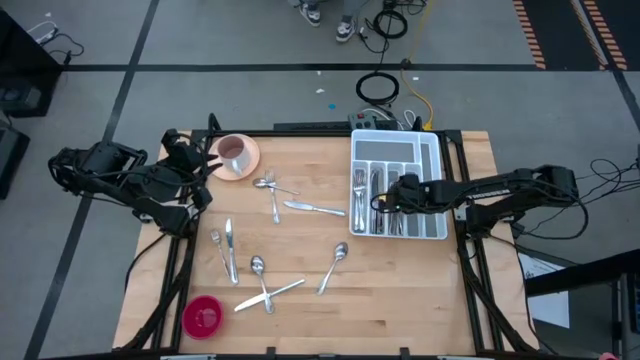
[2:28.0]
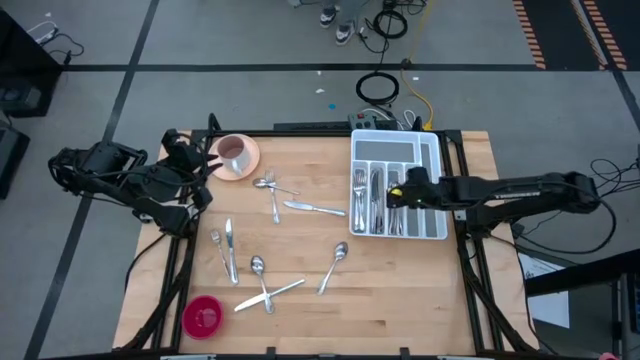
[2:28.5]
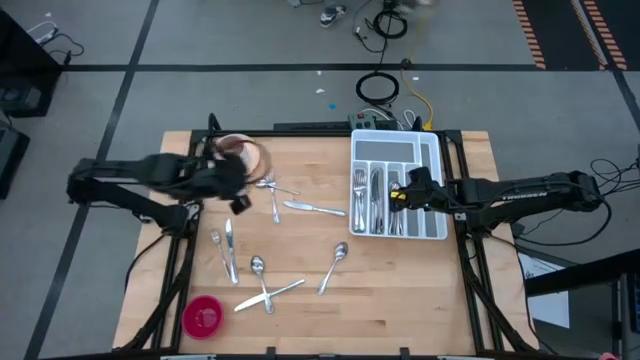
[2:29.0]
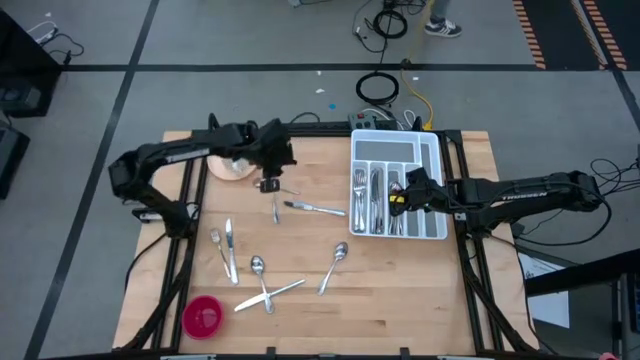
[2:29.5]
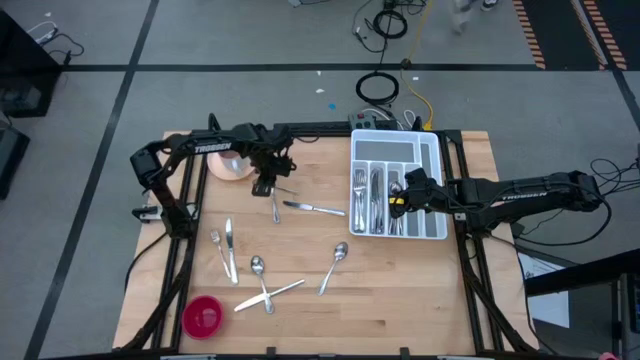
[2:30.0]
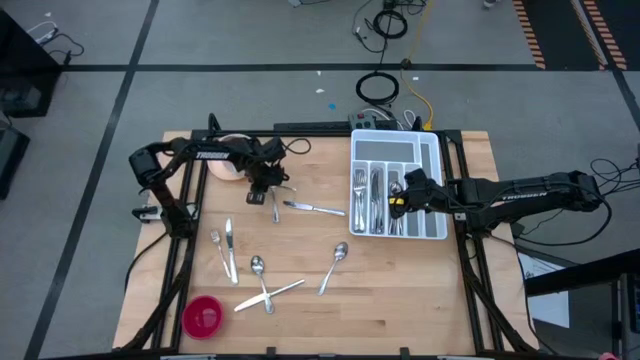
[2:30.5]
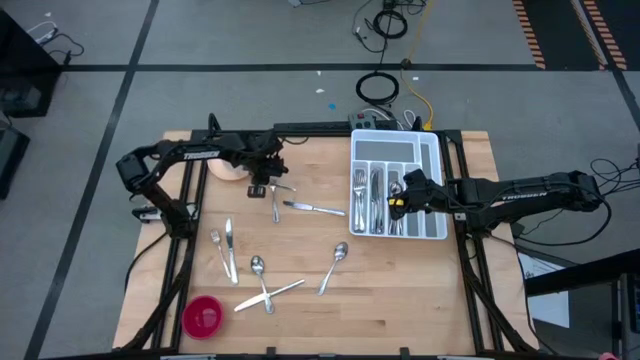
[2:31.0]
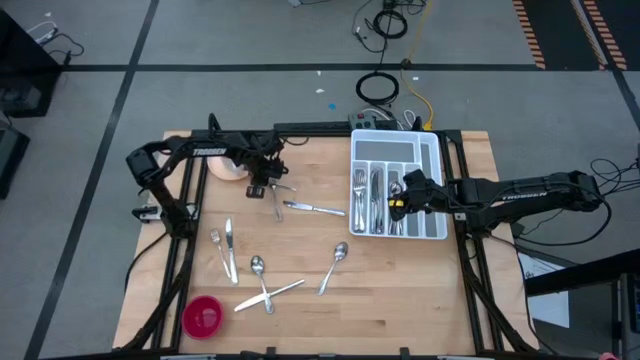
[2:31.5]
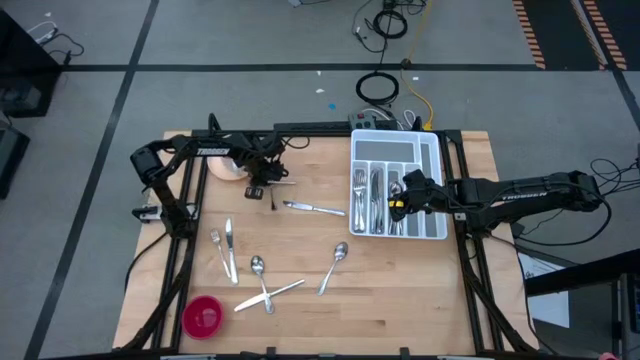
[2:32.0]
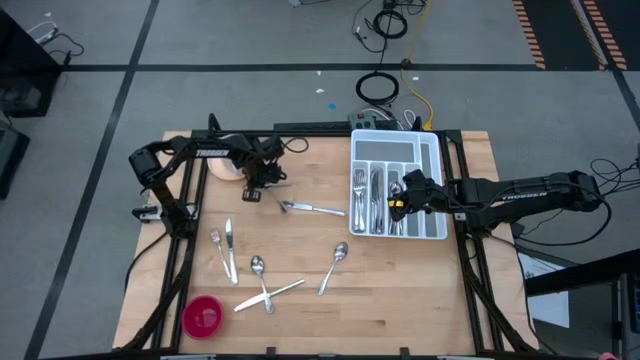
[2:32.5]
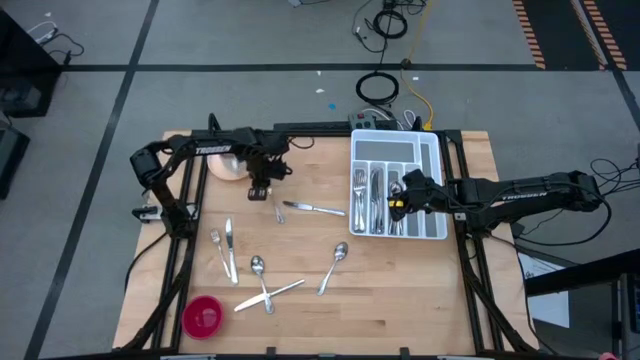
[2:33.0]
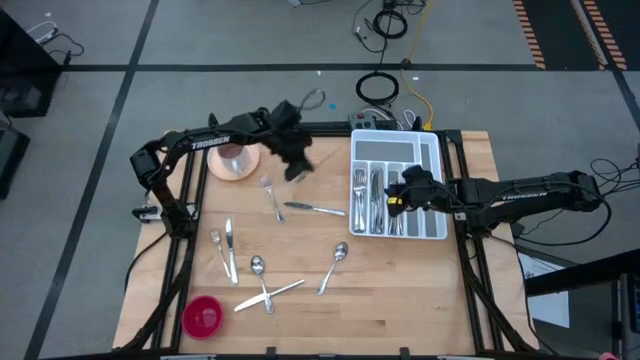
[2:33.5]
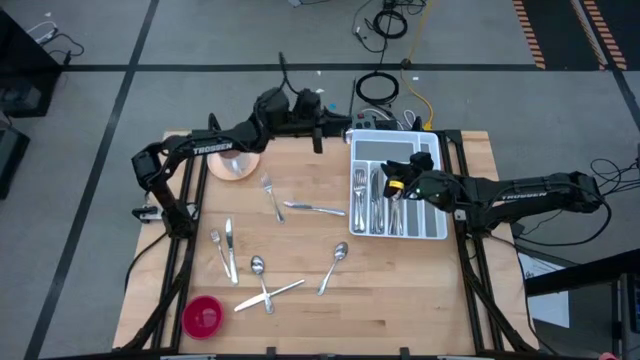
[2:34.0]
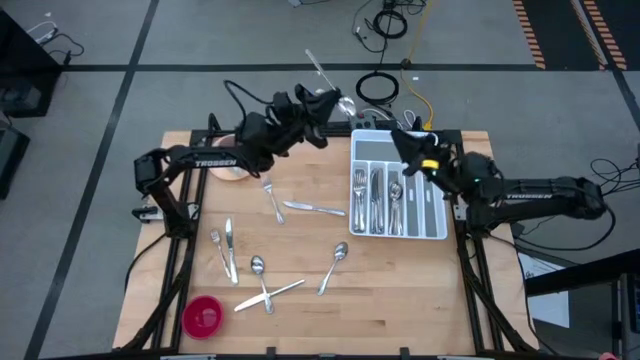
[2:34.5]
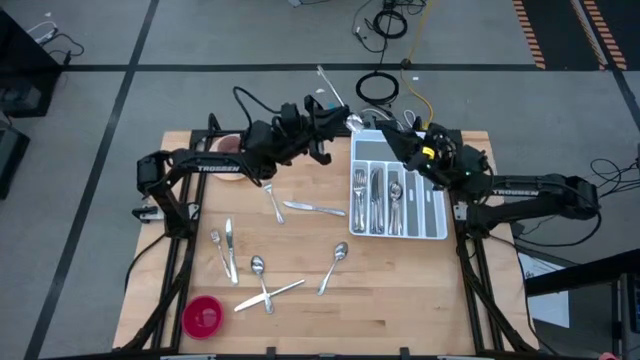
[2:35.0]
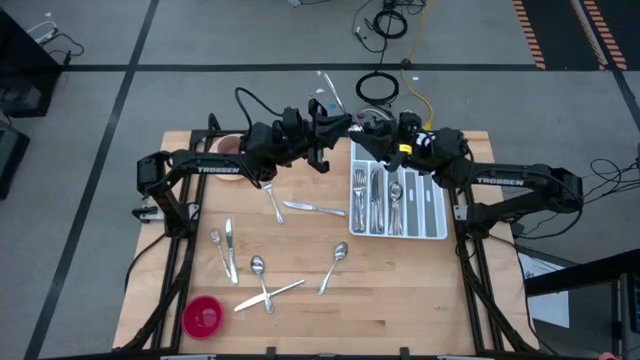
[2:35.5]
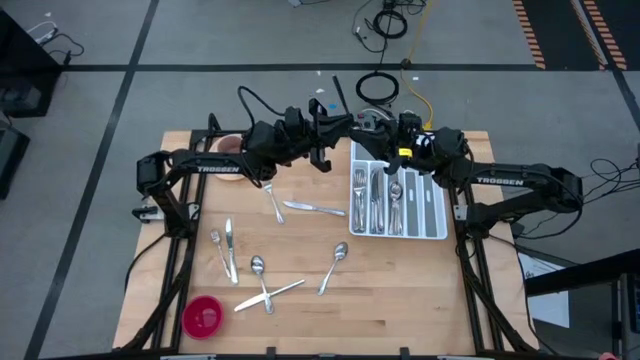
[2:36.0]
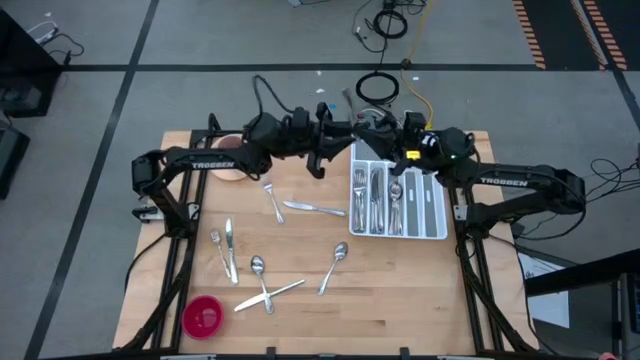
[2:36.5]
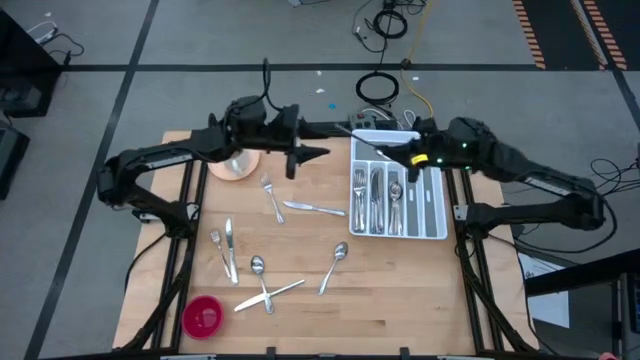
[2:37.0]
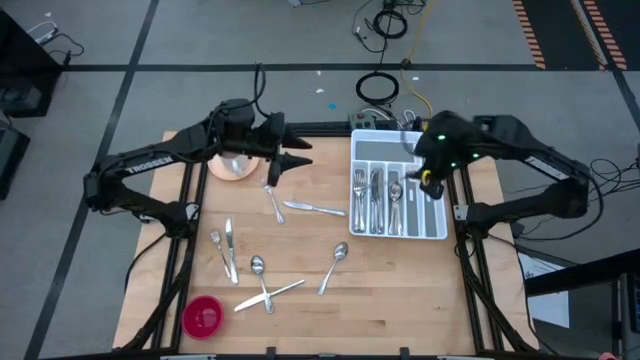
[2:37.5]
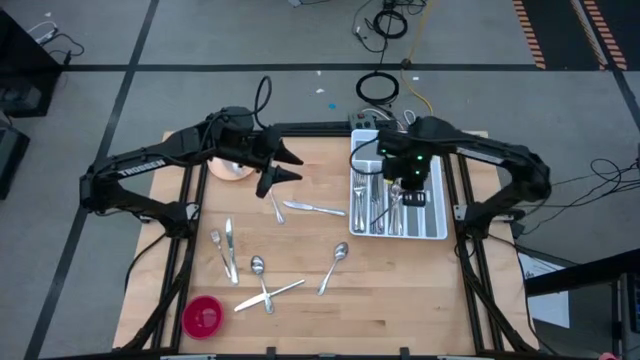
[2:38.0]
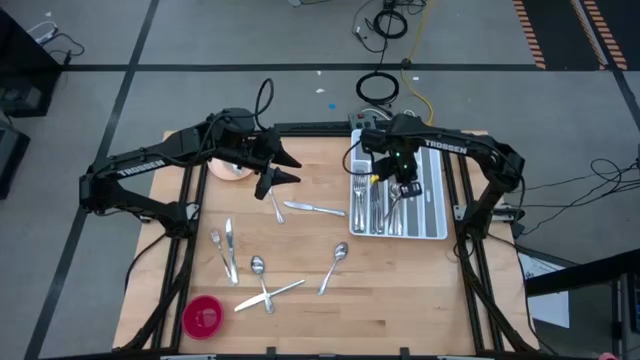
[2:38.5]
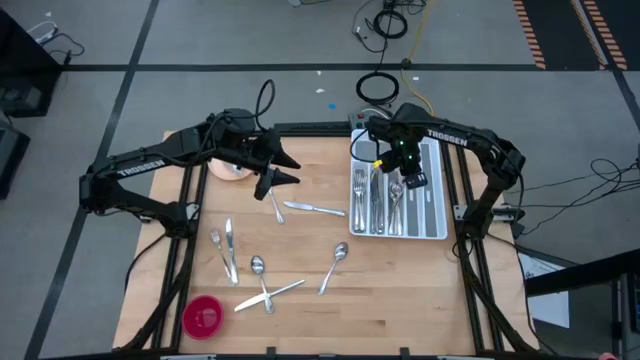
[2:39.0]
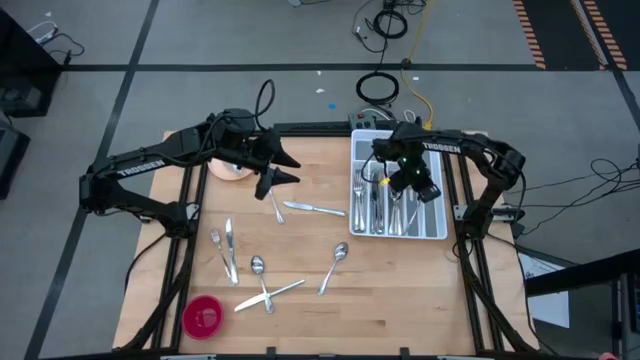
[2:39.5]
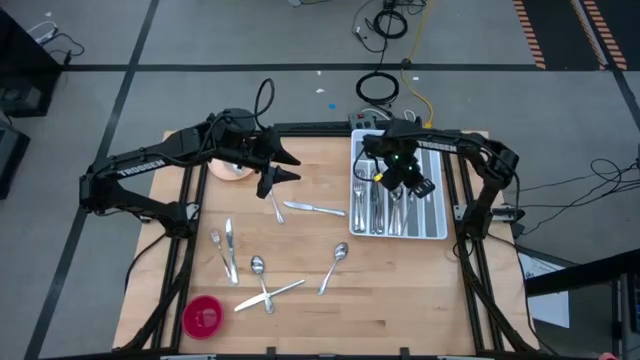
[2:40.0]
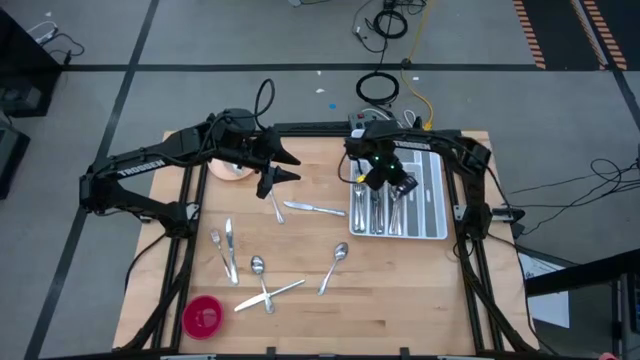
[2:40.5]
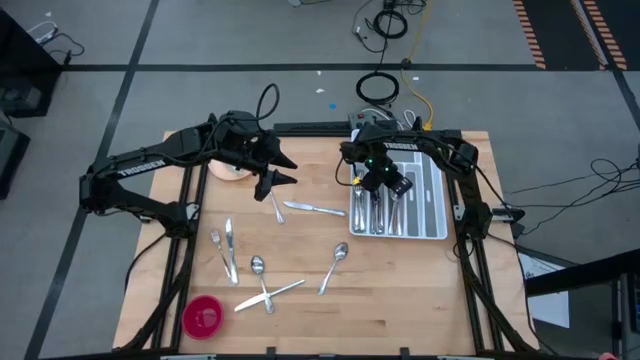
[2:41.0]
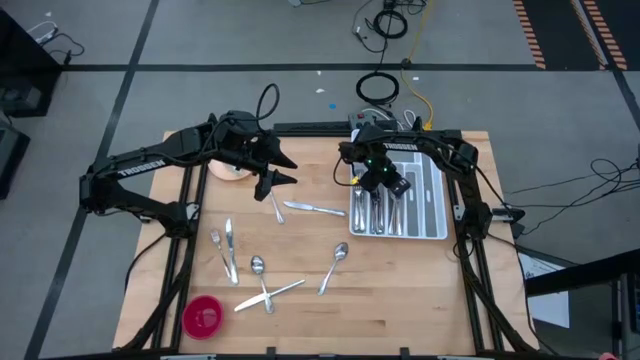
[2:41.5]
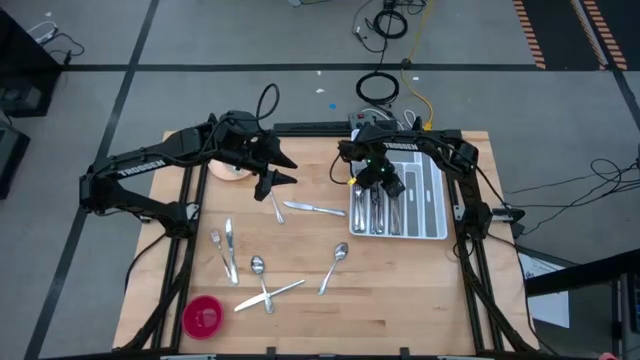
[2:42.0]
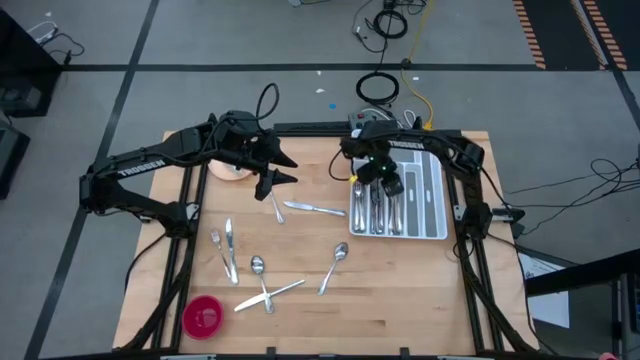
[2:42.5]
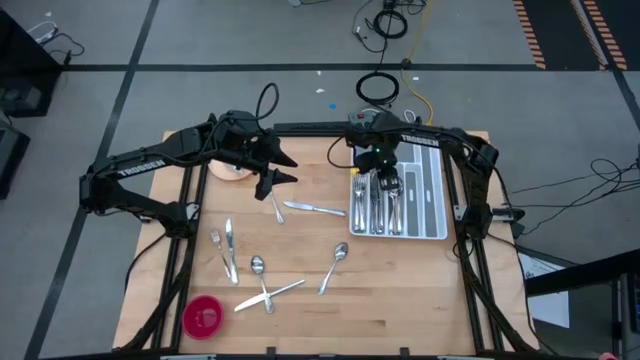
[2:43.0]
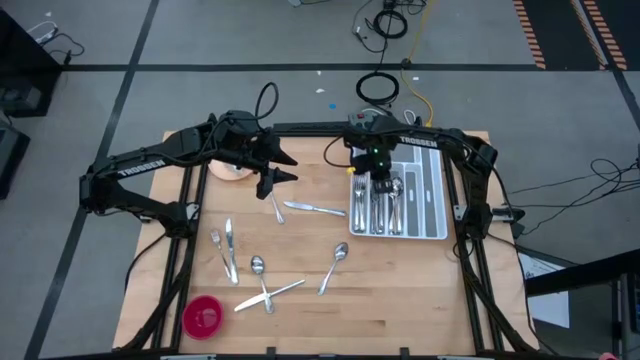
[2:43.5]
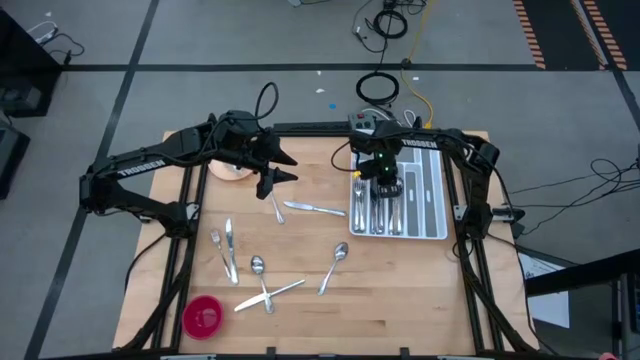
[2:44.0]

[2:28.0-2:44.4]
Task: Sort silverware
Put the top silver spoon into the white silverware tray

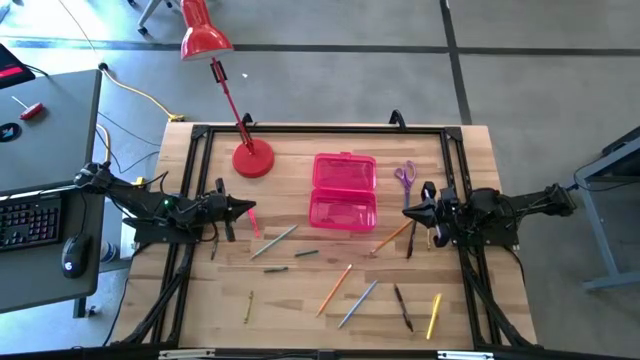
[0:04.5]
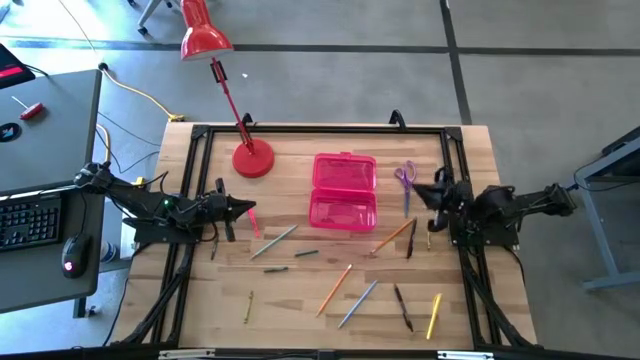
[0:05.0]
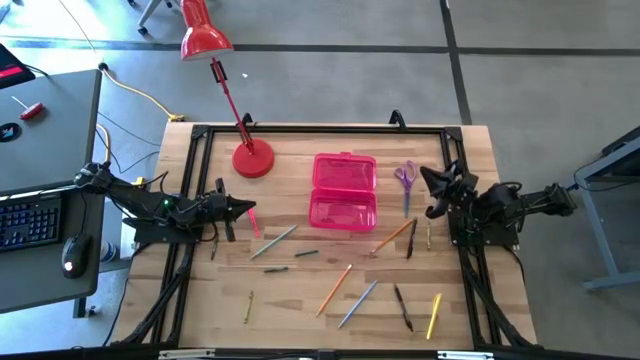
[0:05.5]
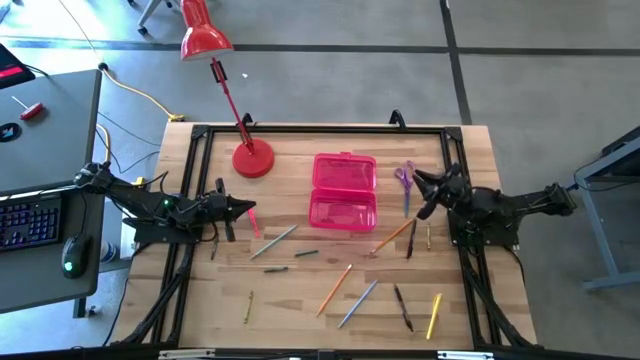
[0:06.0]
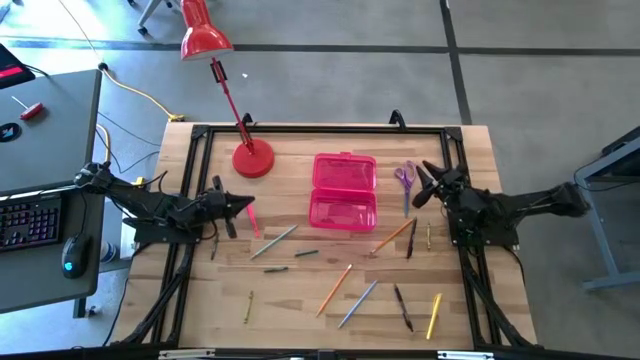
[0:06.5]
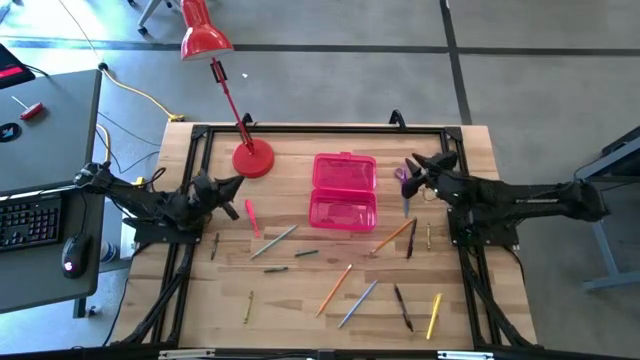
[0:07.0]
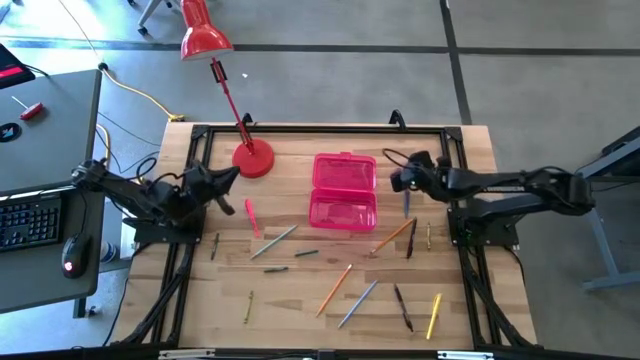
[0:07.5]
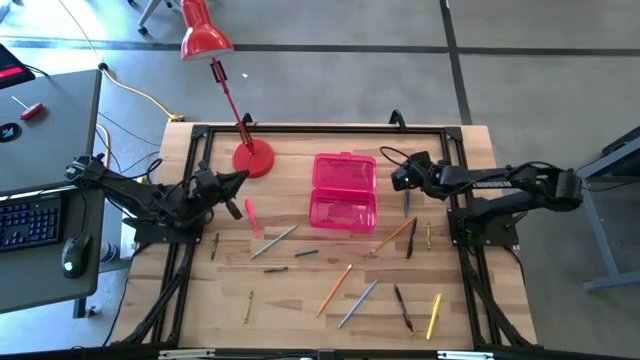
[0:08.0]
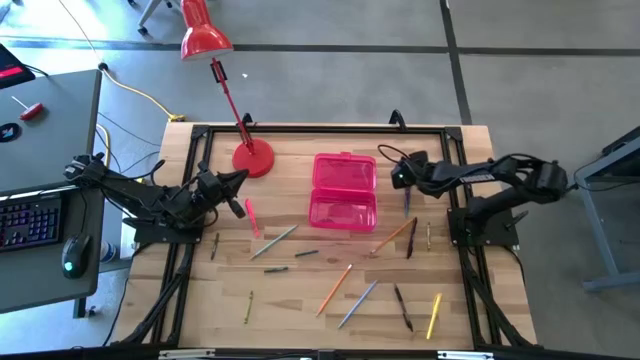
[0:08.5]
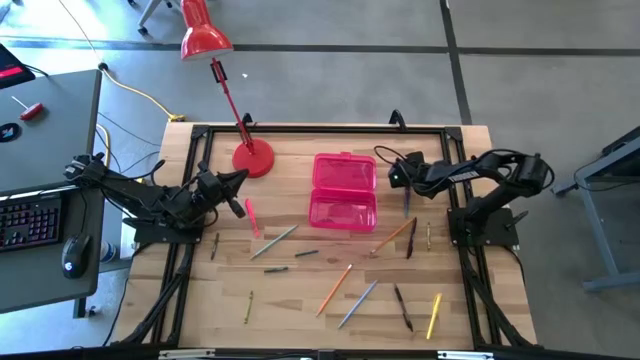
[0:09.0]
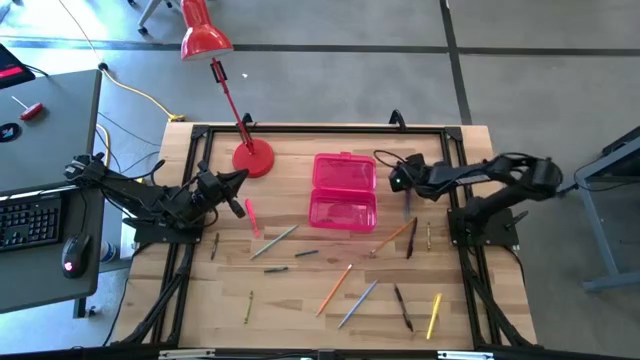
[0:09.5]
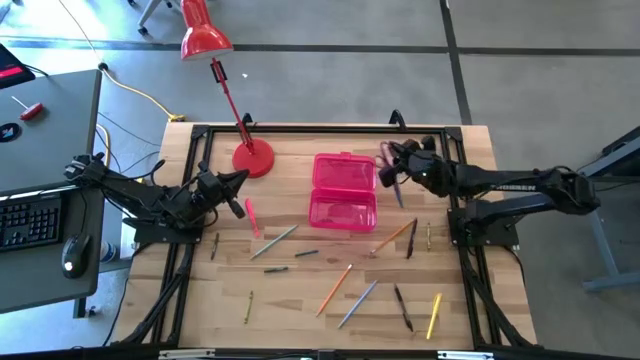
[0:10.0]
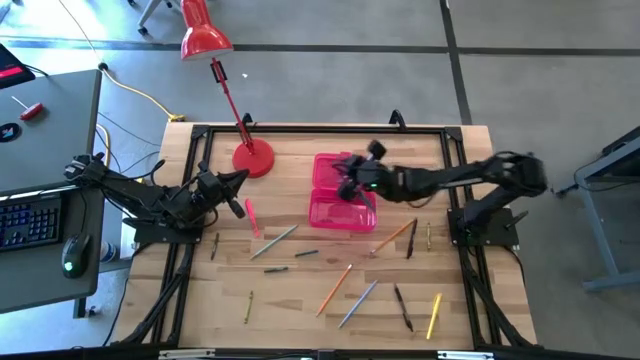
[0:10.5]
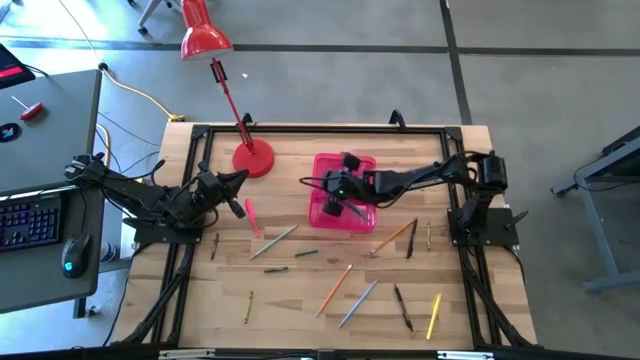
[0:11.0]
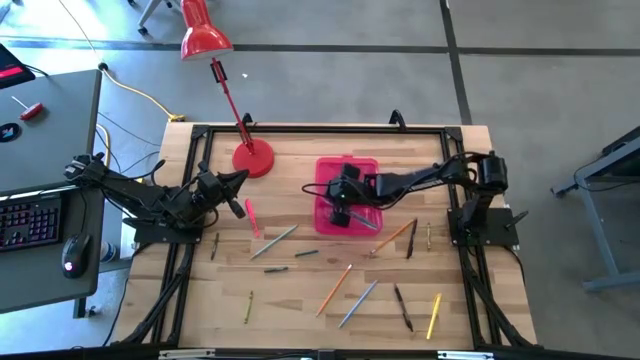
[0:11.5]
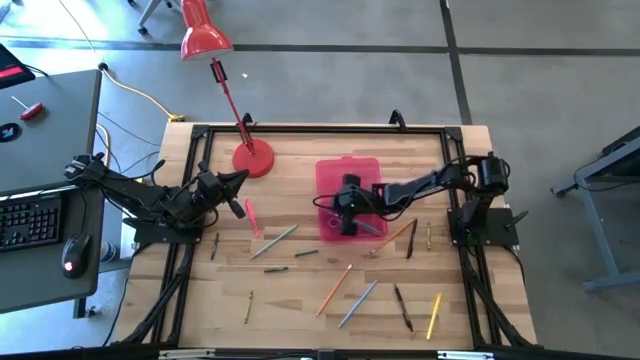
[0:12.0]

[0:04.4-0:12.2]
Task: Pick & place school supplies into a supply box
Put the purple scissors into the red supply box
